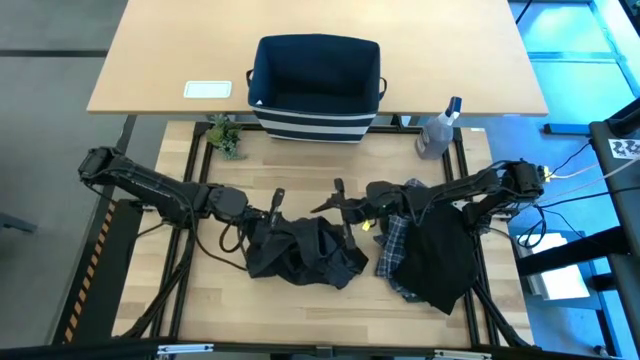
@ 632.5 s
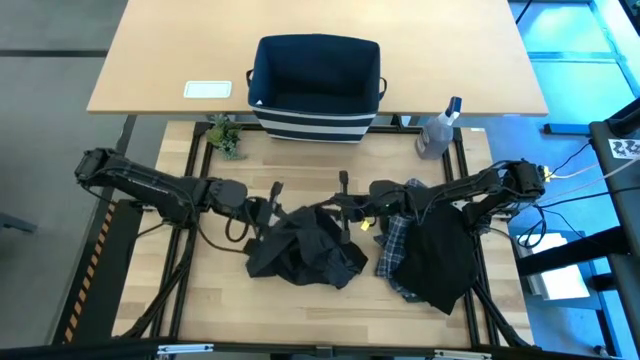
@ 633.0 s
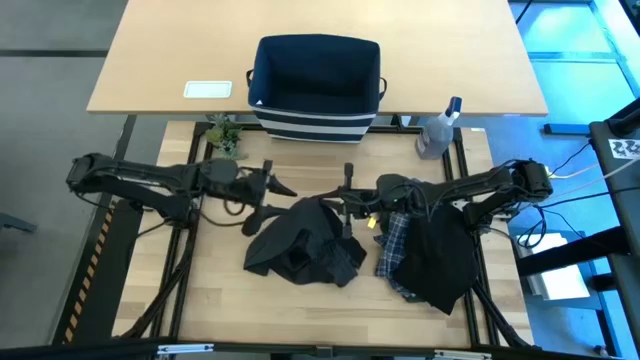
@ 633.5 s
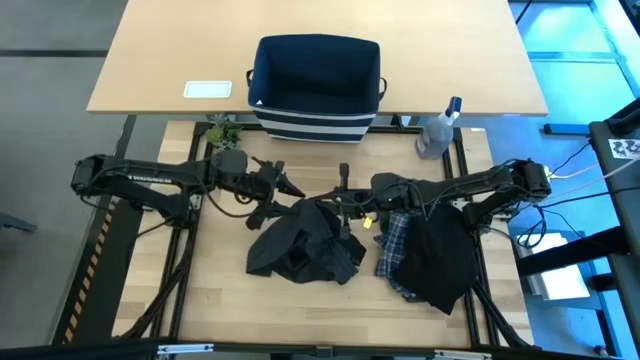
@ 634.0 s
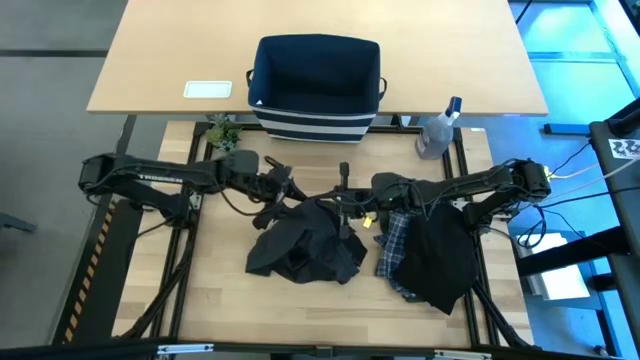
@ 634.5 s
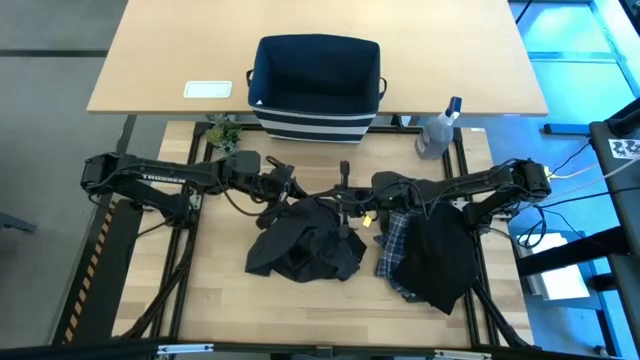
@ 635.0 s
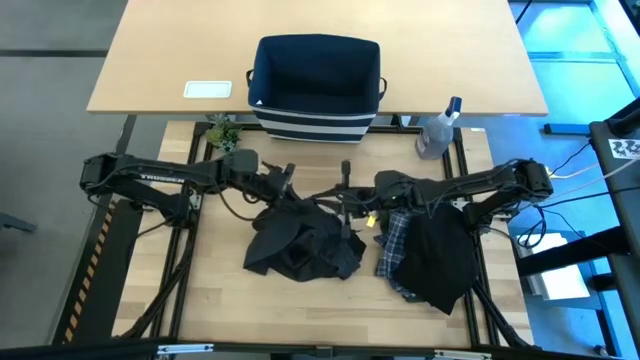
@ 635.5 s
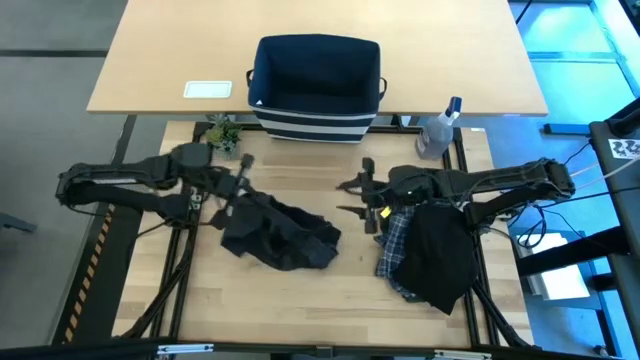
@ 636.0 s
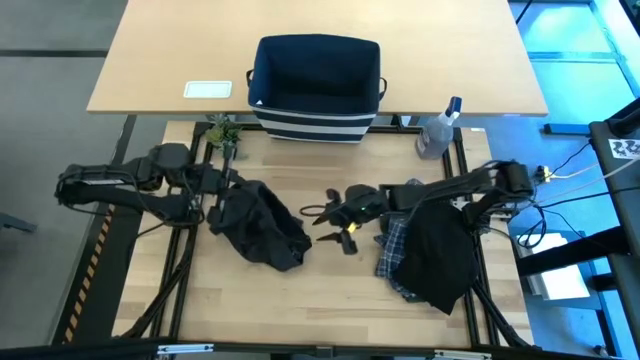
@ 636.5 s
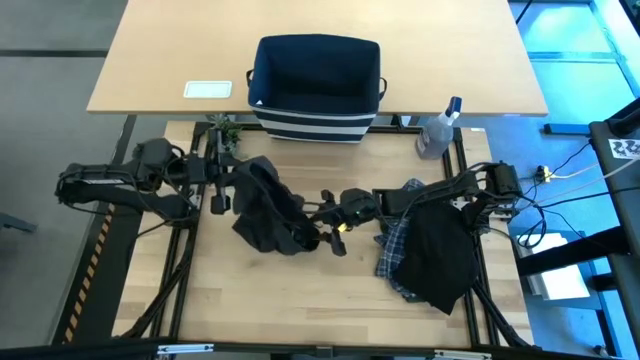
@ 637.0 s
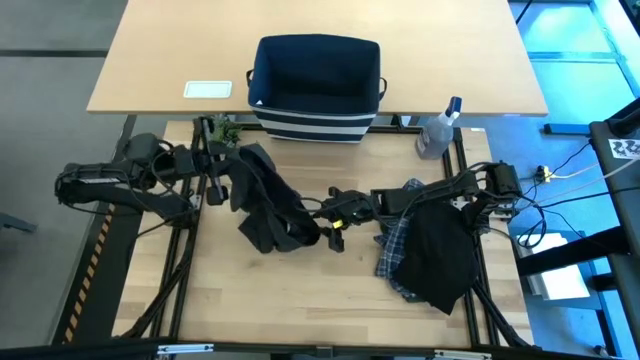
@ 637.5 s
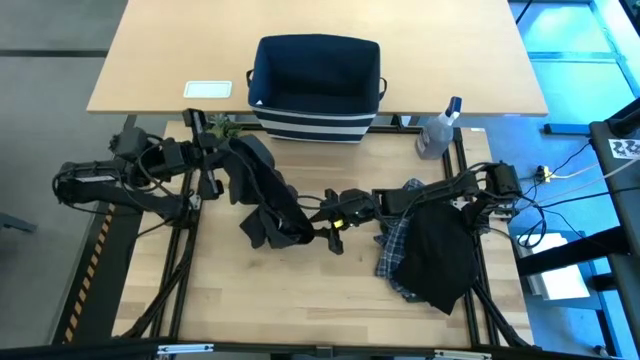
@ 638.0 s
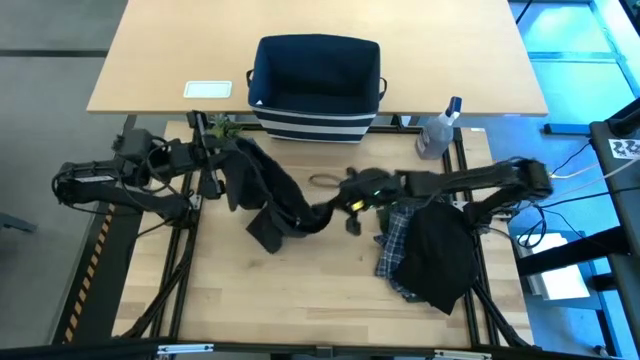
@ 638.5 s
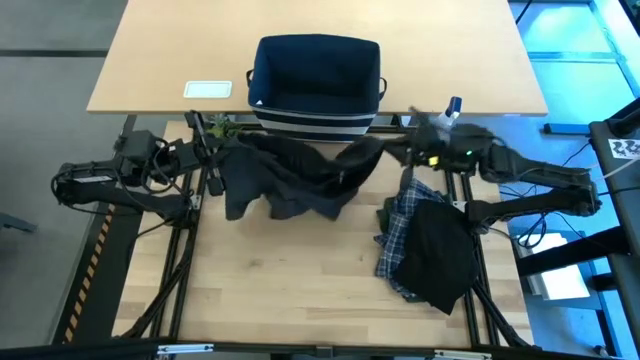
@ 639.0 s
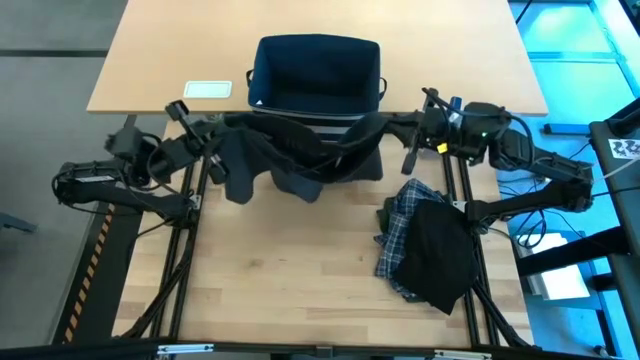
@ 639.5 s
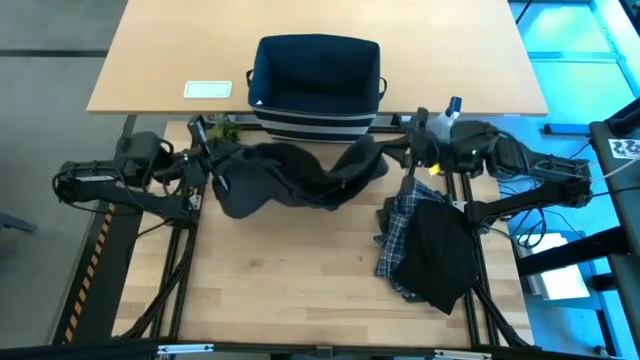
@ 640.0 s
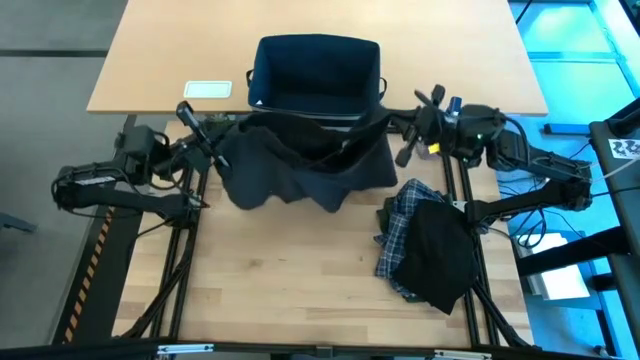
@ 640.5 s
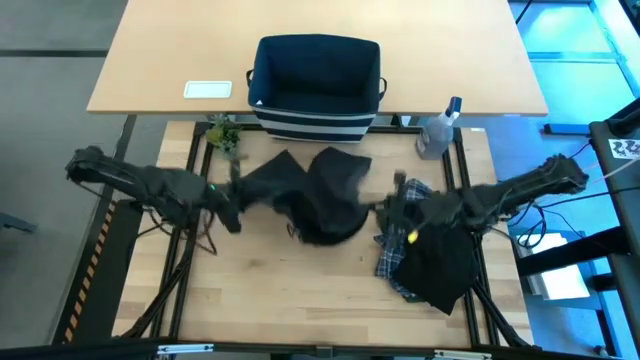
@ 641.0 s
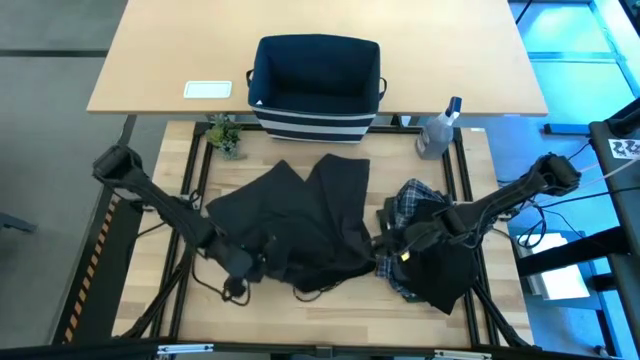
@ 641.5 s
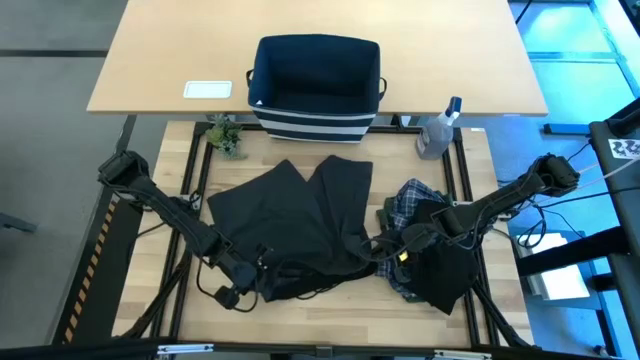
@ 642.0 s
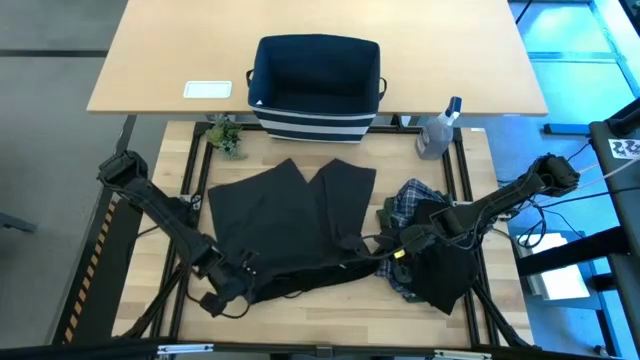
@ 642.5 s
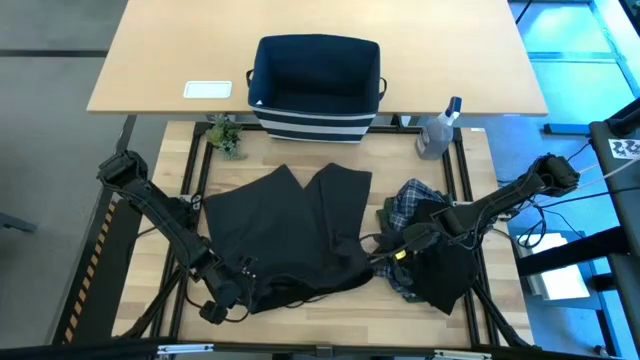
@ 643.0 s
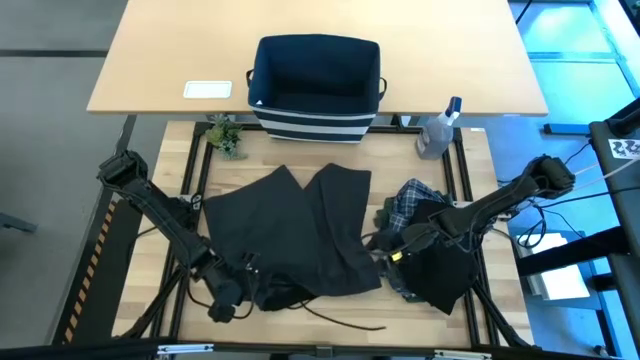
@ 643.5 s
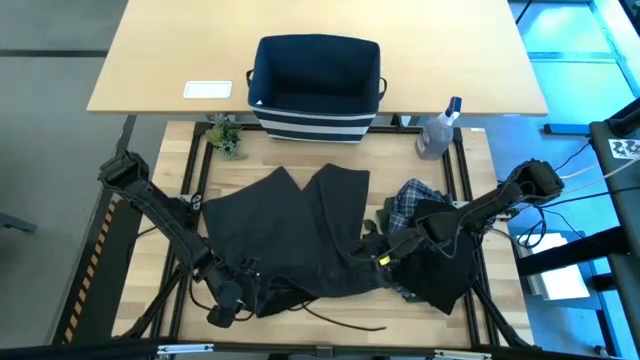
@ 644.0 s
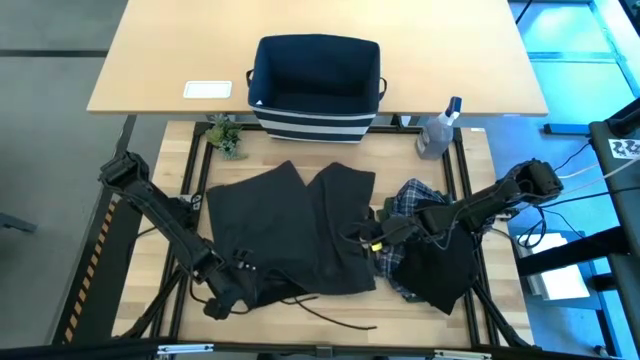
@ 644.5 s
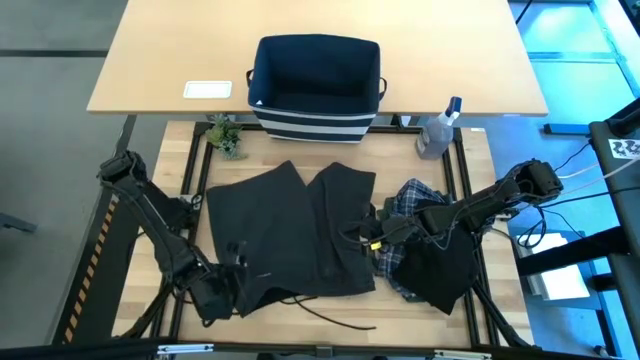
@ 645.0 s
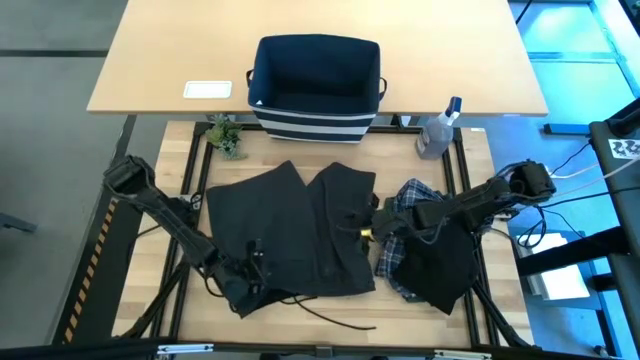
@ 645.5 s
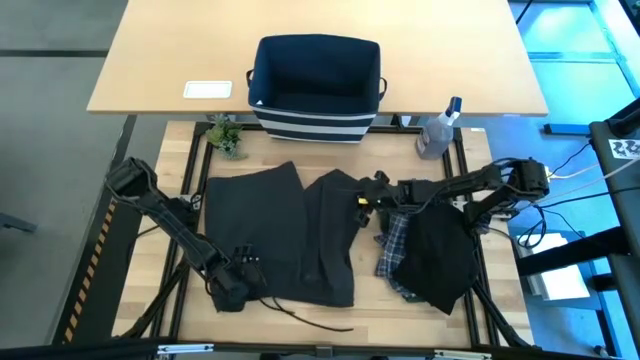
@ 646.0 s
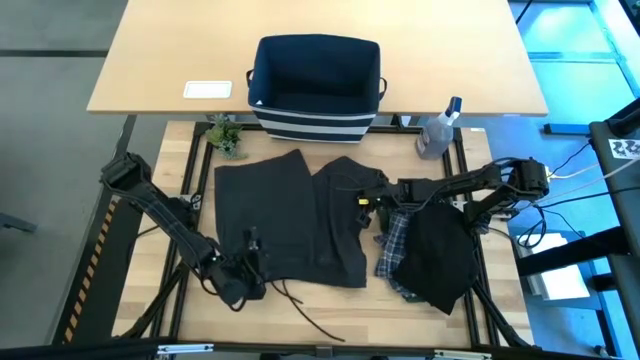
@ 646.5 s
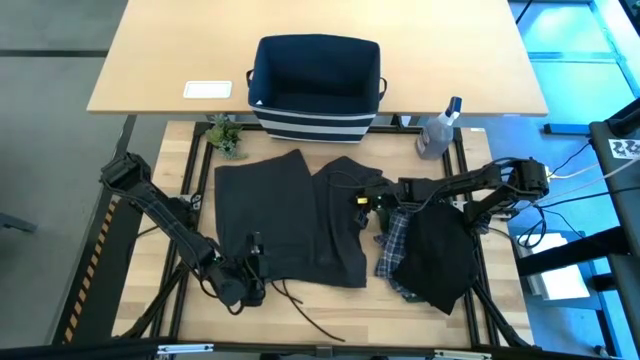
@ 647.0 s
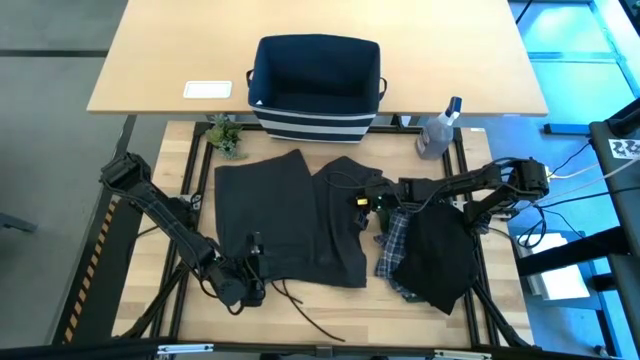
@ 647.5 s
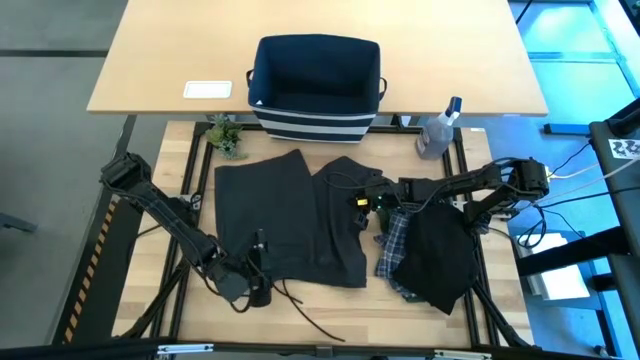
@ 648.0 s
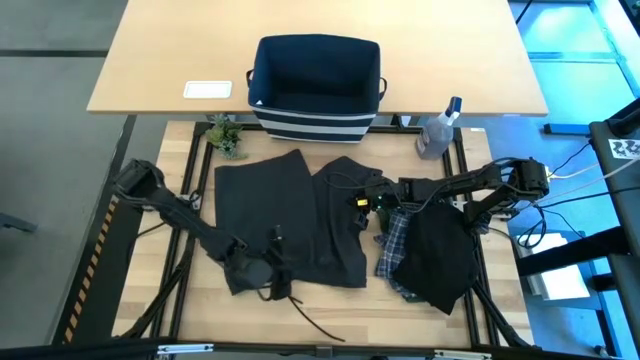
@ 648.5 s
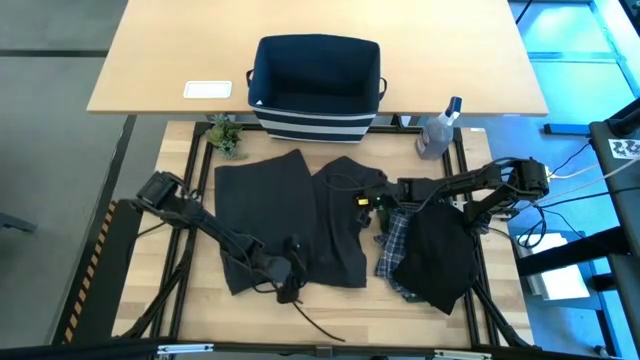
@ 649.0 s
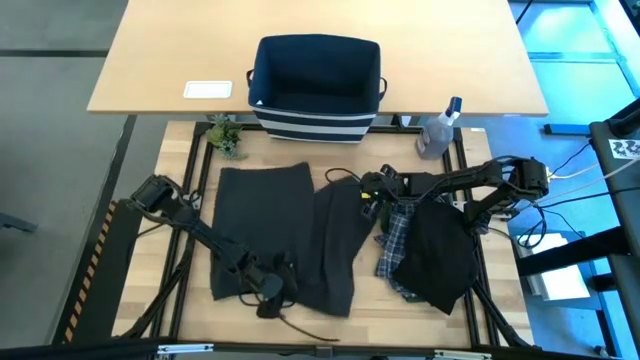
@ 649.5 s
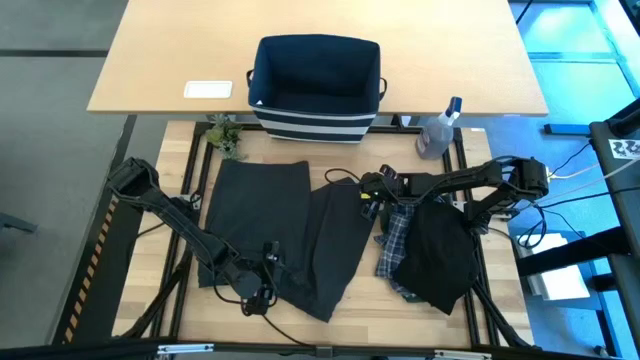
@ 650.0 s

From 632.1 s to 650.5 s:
Task: Fold Laundry from Bin
Fold the black shorts

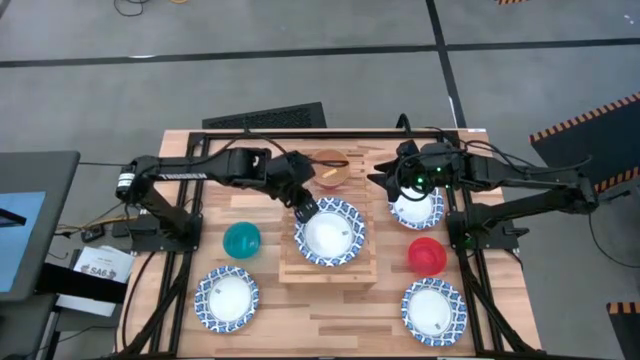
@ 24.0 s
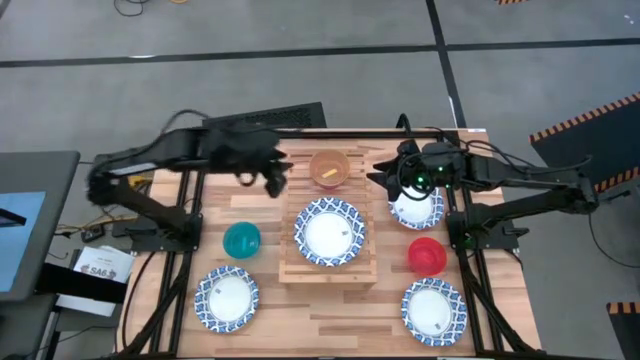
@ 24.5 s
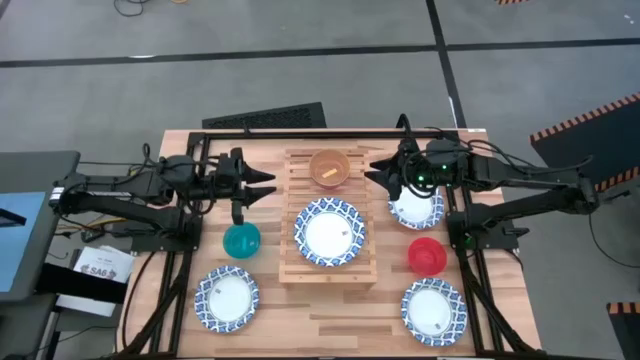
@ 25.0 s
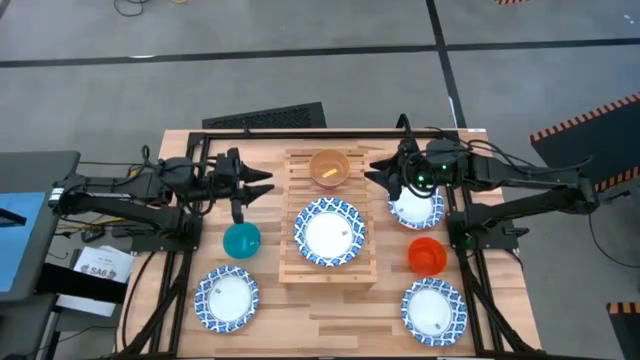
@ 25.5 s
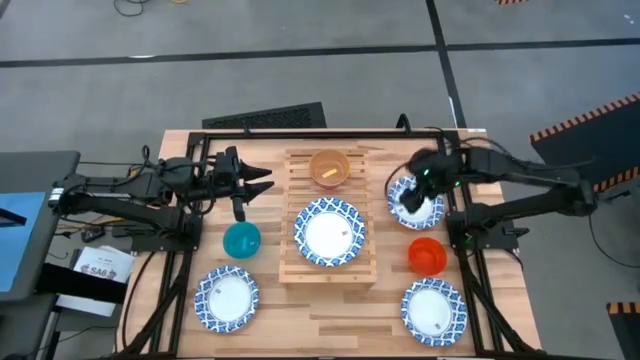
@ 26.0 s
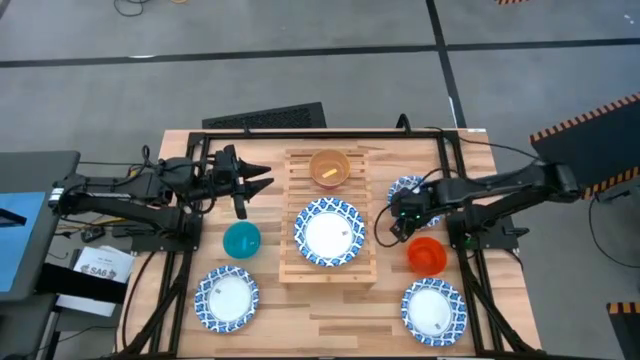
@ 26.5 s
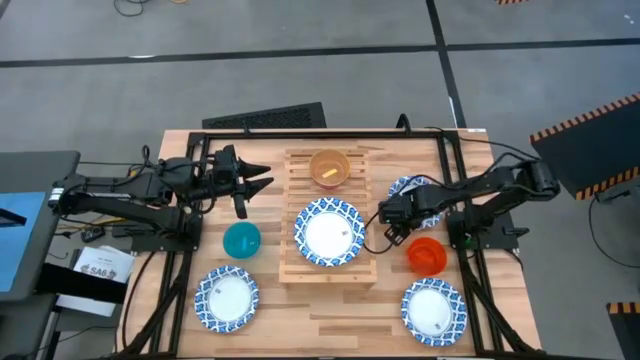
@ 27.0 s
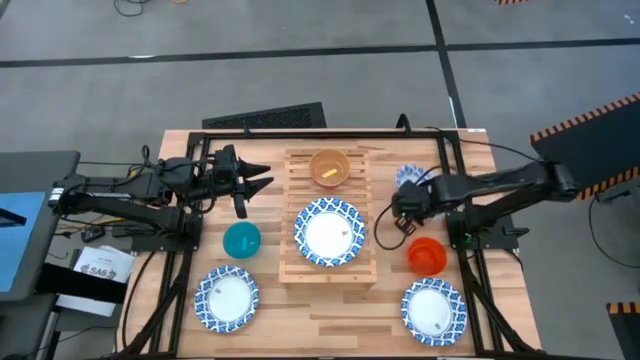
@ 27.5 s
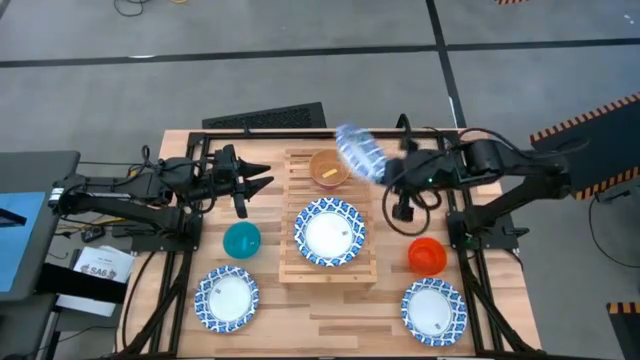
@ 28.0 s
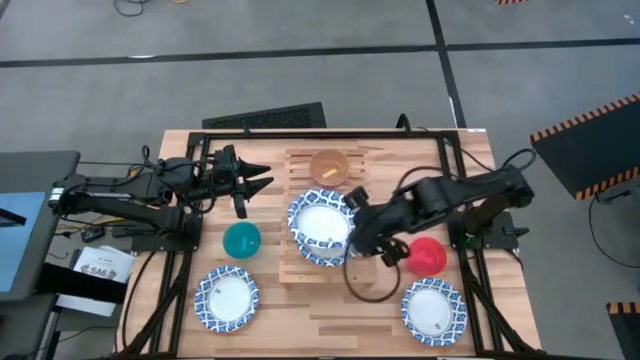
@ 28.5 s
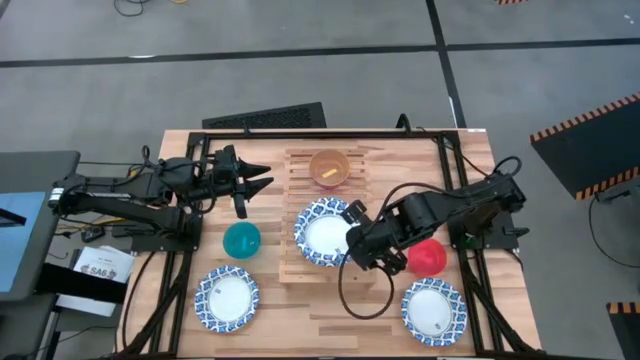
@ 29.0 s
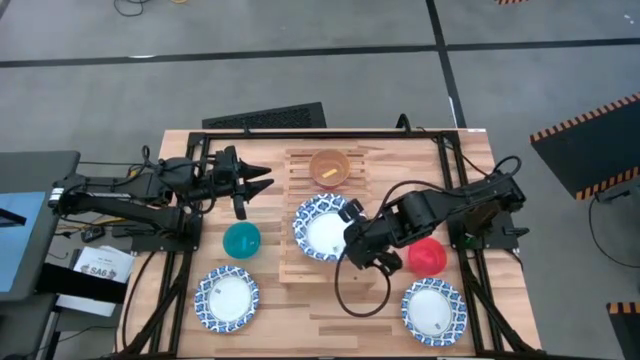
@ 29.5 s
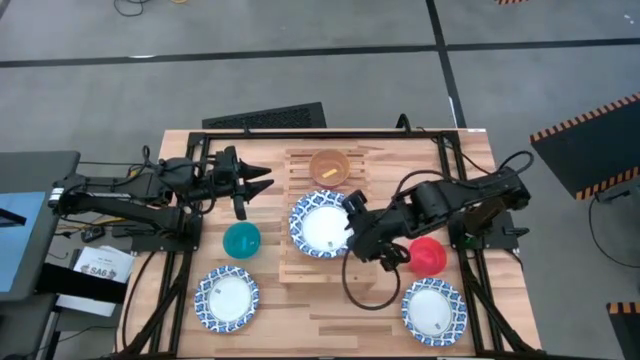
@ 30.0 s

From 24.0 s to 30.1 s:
Task: Place and stack bowls onto a shelf
Stack the top right white patterned bowl on top of the white patterned bowl on the shelf
